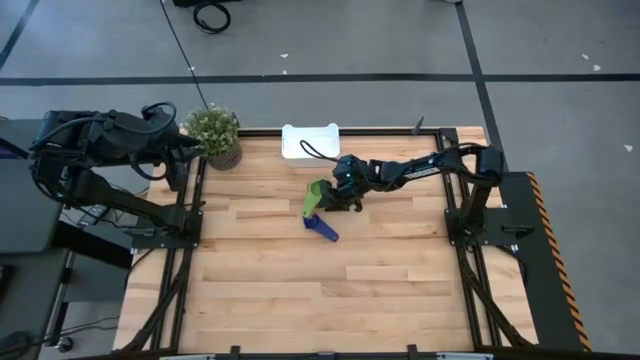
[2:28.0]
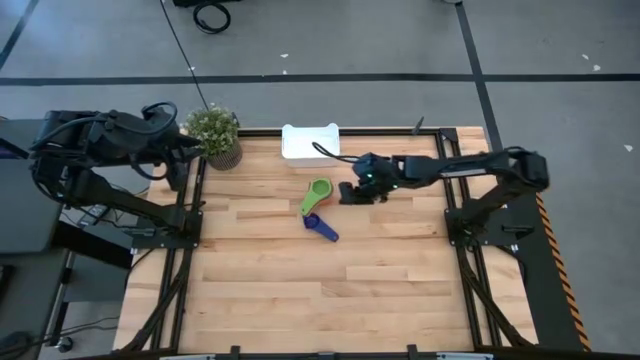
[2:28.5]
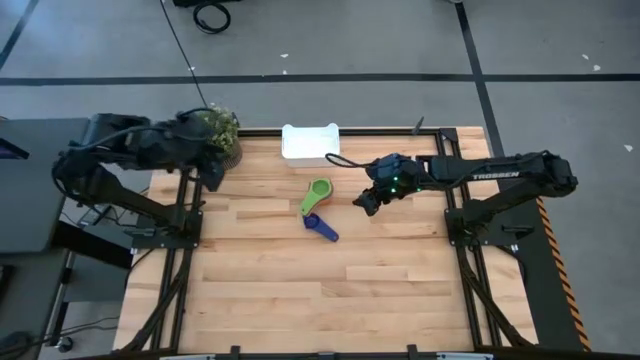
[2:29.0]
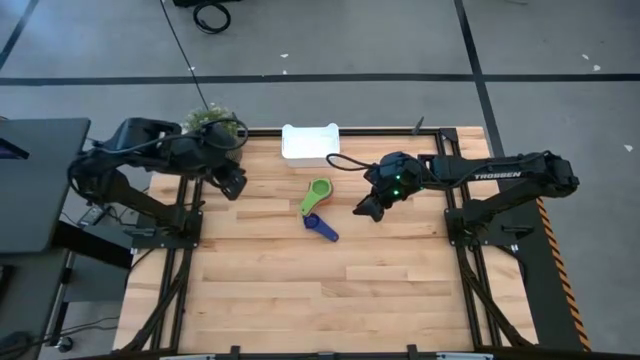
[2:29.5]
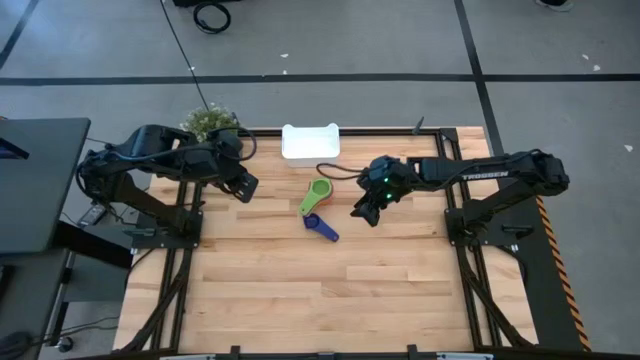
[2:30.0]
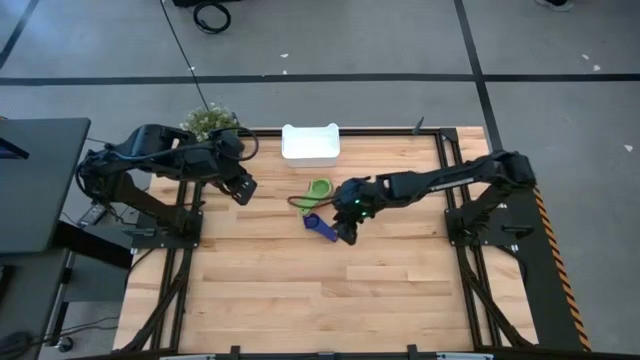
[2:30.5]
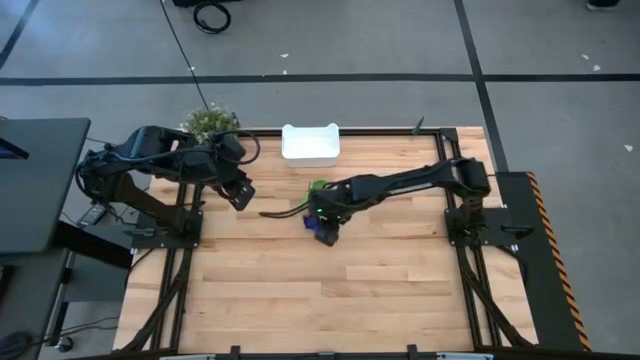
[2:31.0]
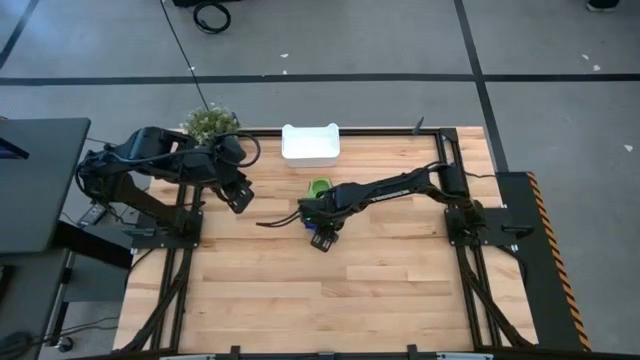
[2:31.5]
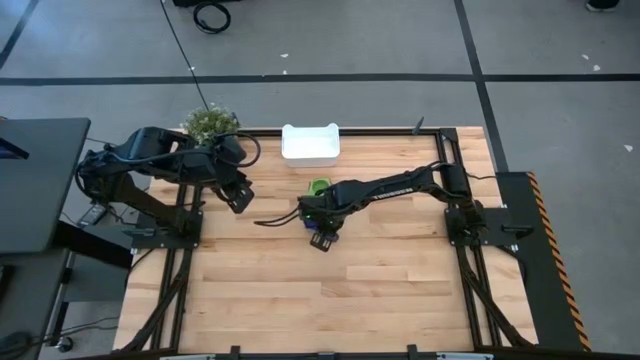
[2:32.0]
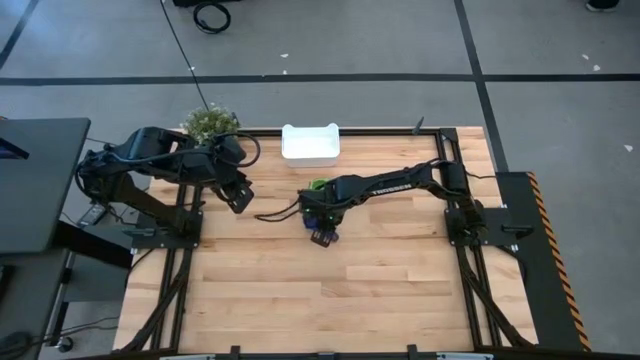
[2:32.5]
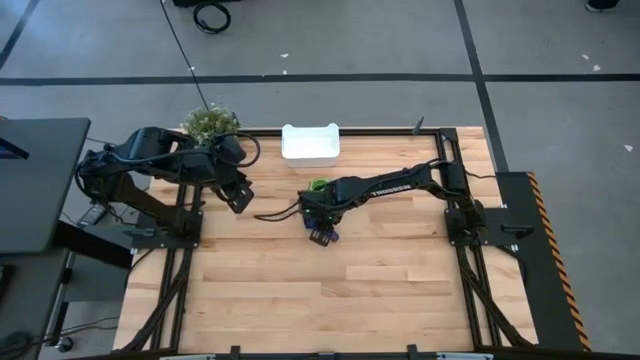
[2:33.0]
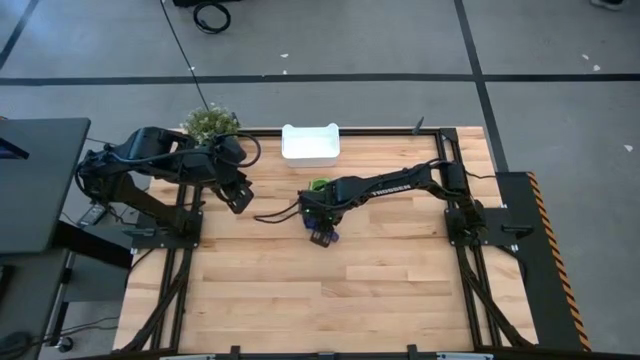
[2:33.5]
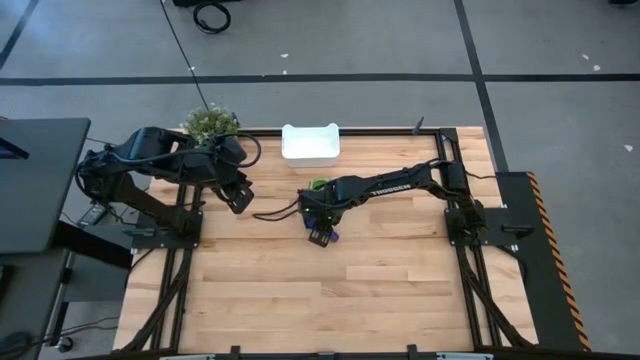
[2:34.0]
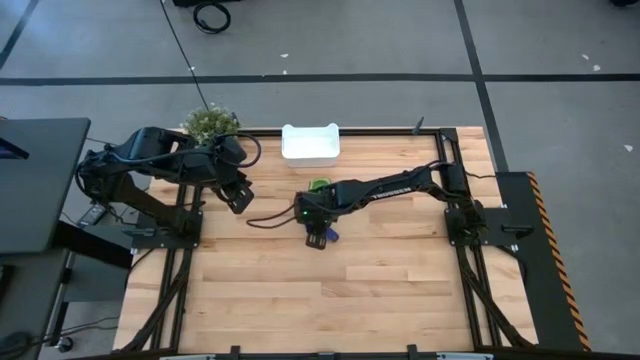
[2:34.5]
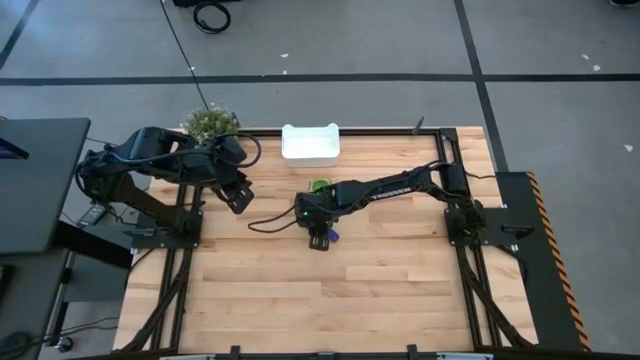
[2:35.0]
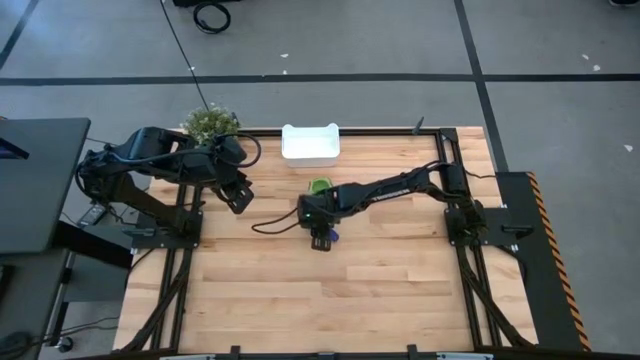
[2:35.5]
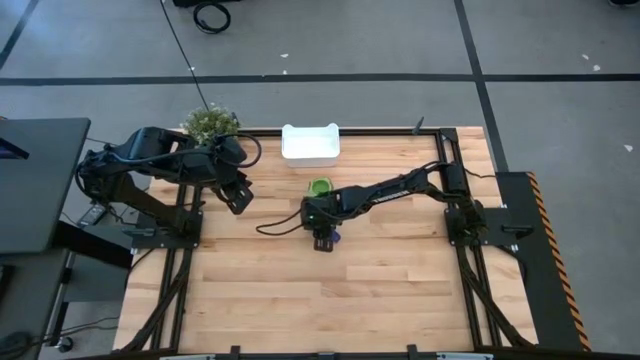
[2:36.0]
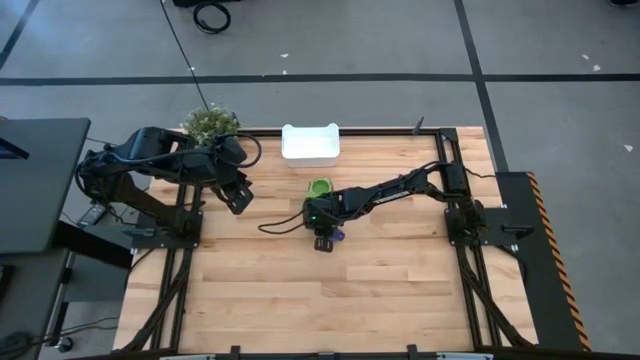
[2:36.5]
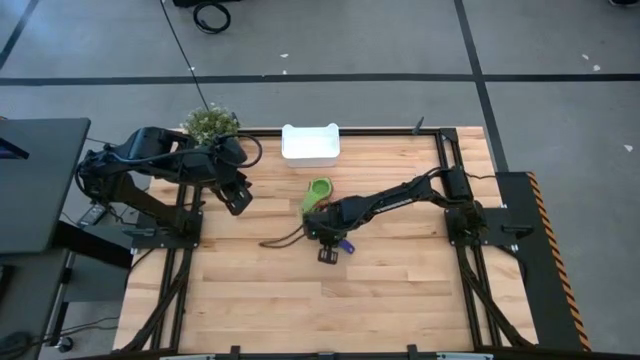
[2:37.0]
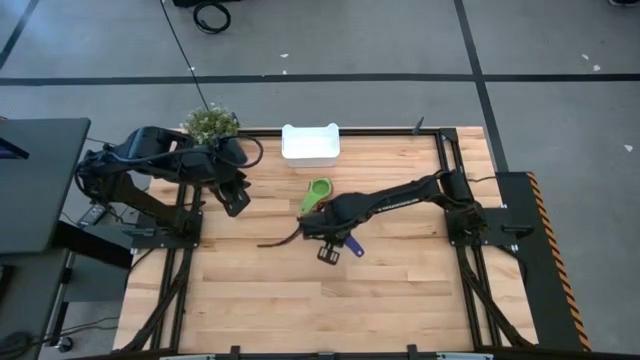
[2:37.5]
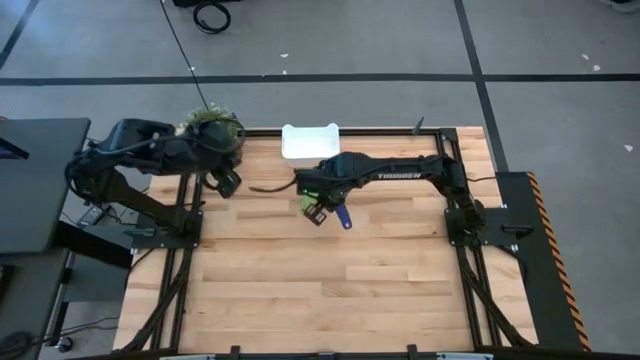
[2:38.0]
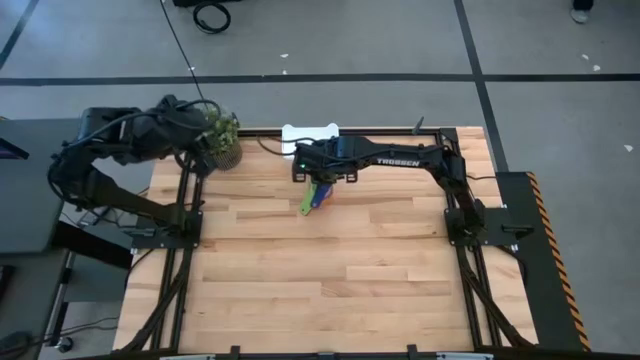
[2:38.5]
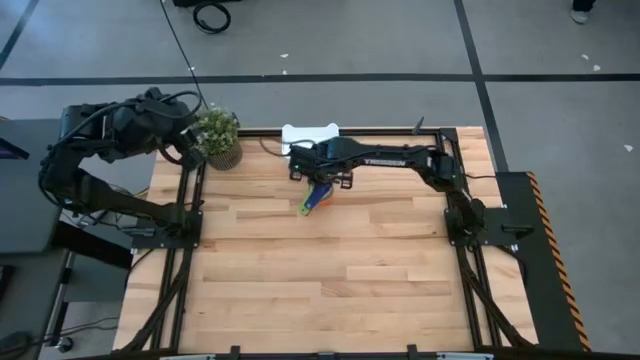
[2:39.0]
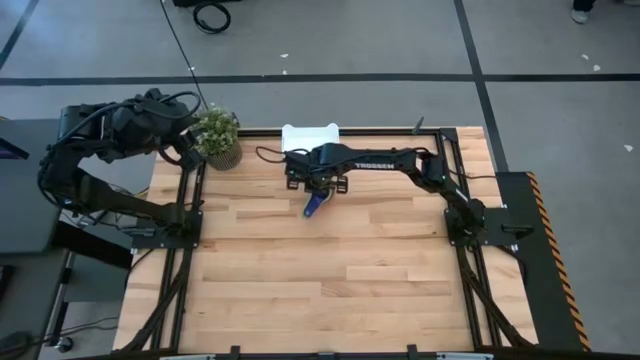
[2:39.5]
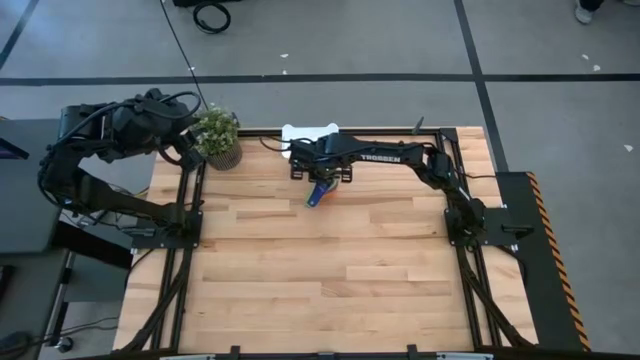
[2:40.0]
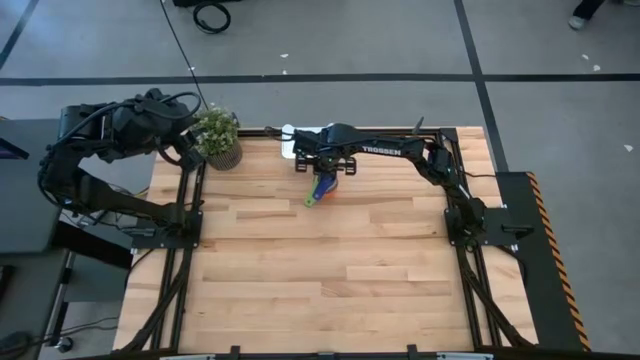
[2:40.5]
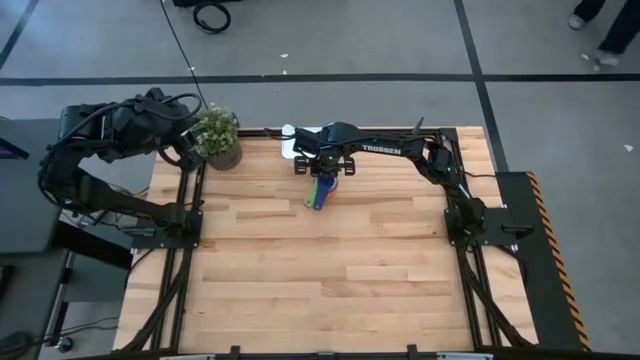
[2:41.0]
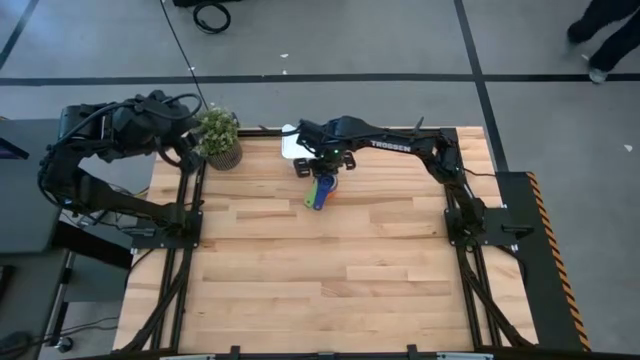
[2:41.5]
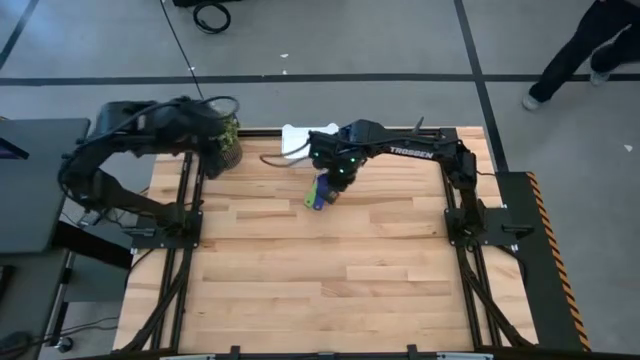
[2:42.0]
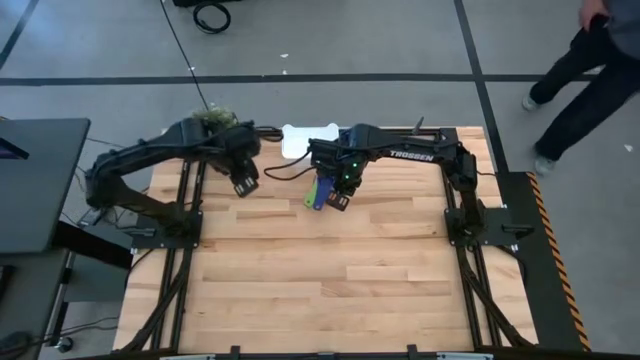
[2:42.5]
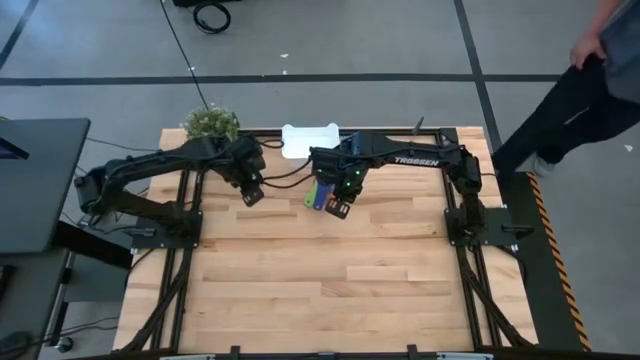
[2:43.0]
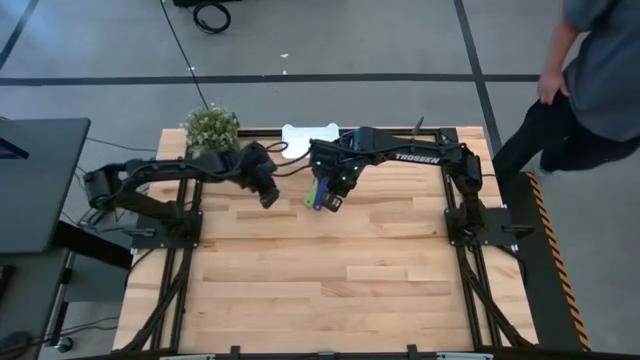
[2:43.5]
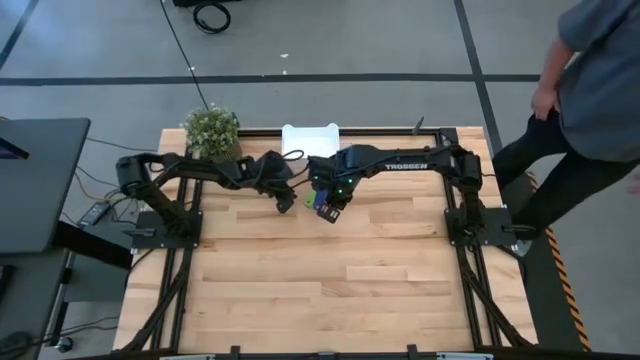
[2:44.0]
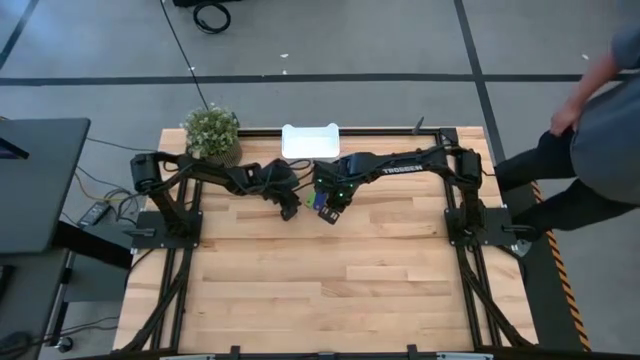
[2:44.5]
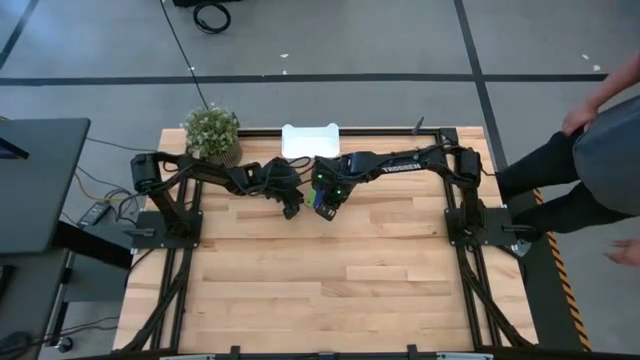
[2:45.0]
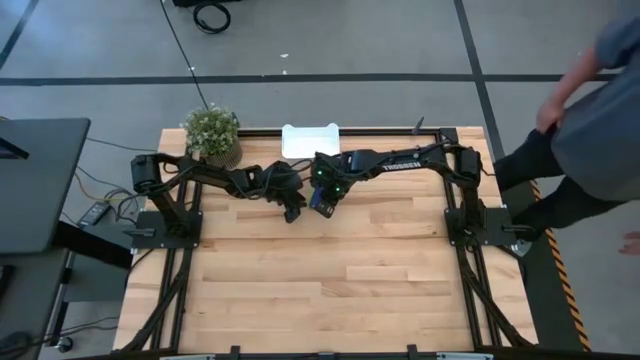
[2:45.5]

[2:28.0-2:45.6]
Task: Nest measuring cups in basket
Stack the violet measuring cup on top of the green measuring cup
